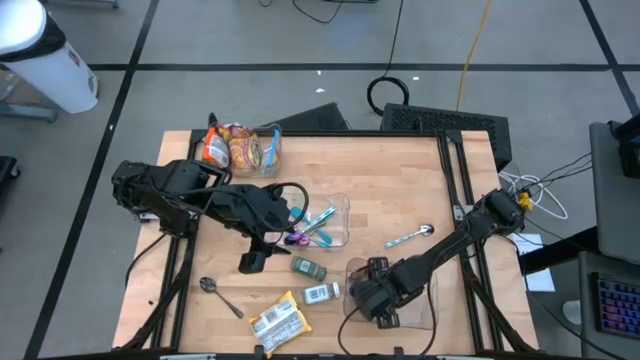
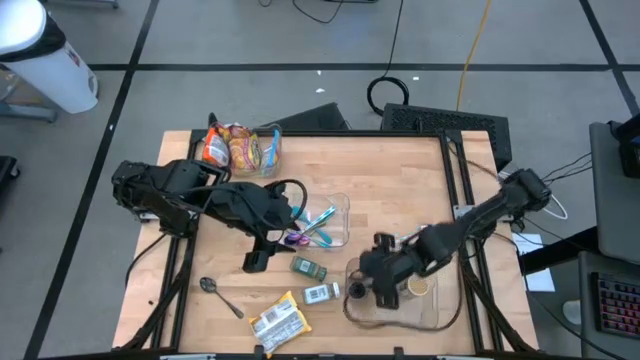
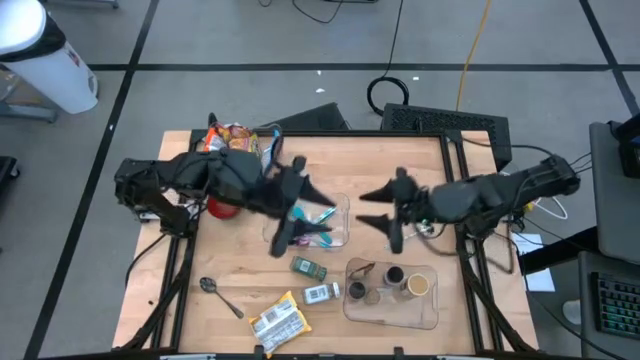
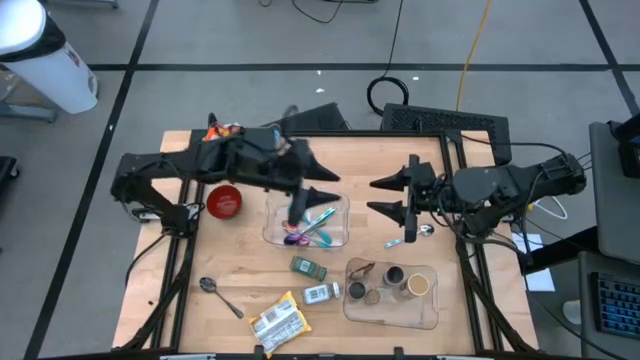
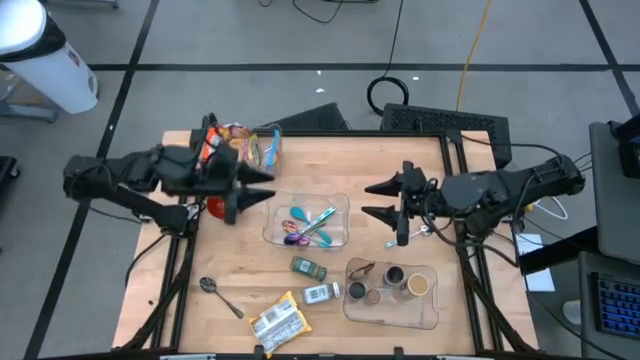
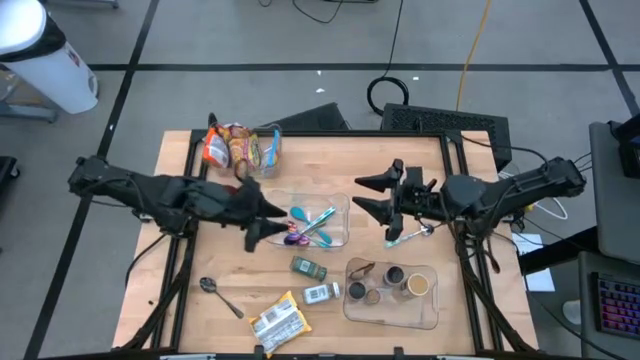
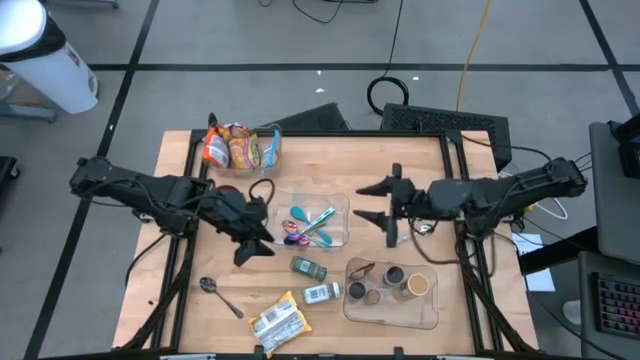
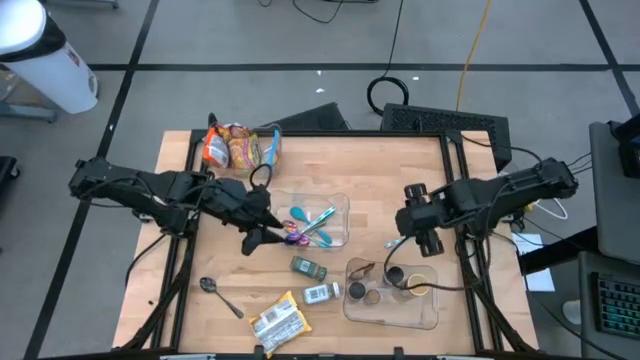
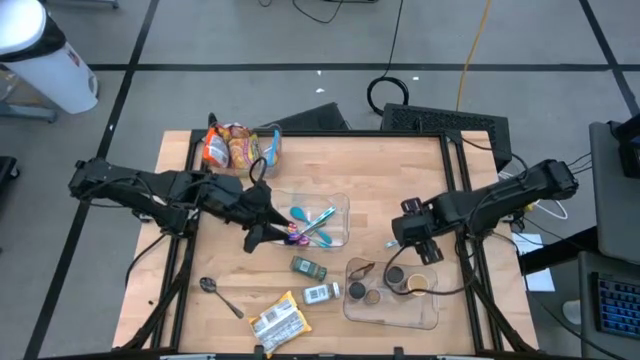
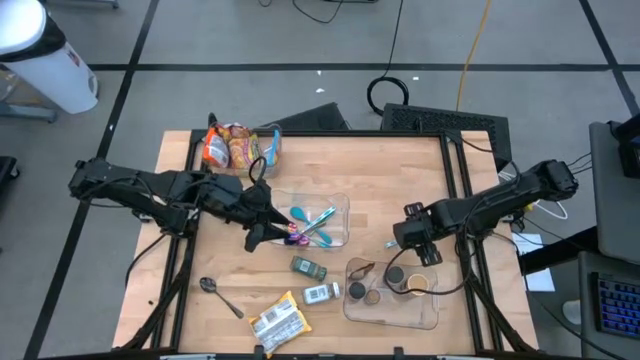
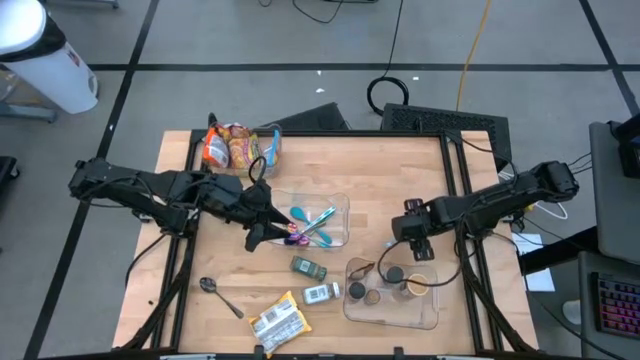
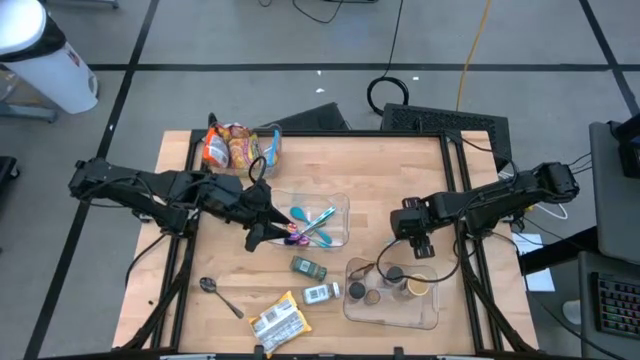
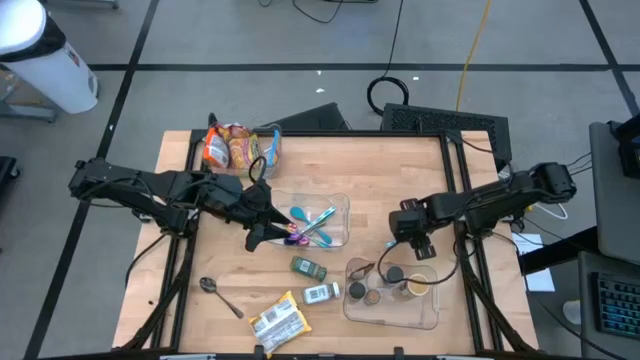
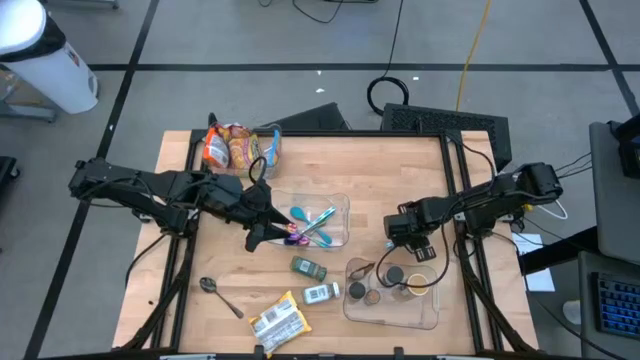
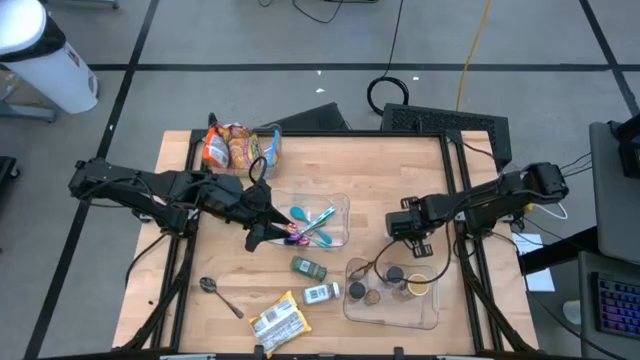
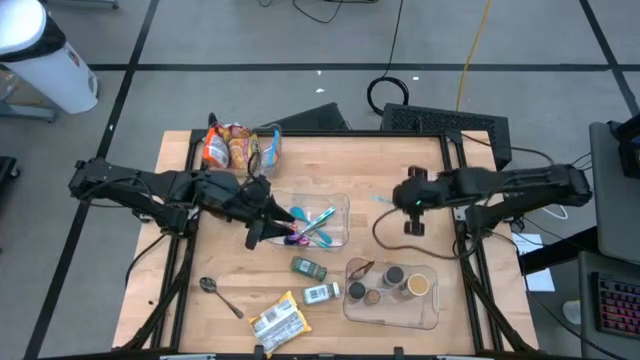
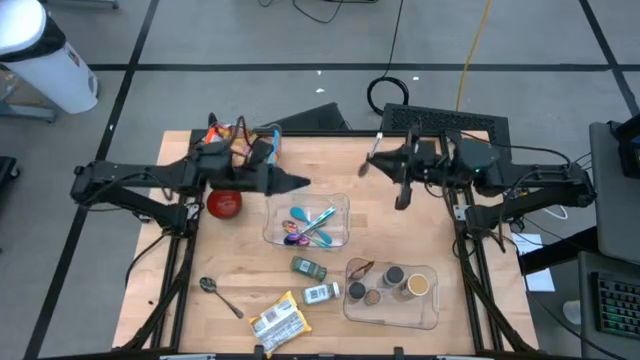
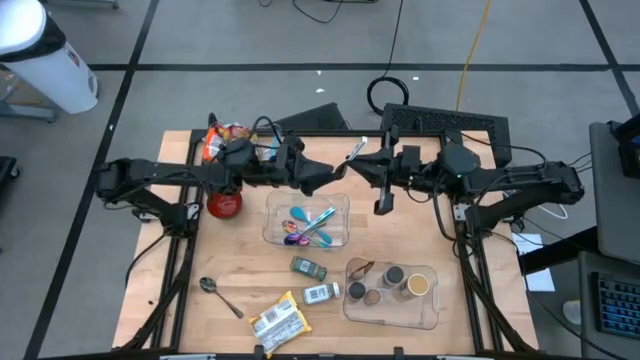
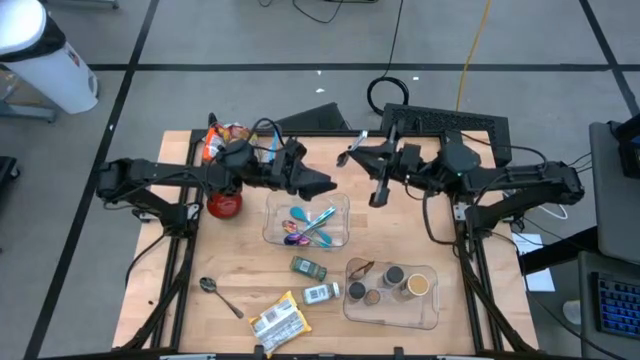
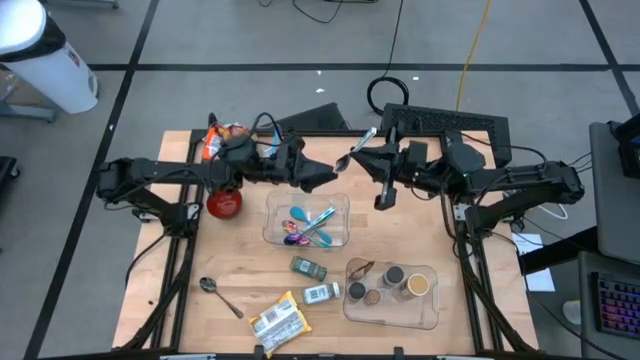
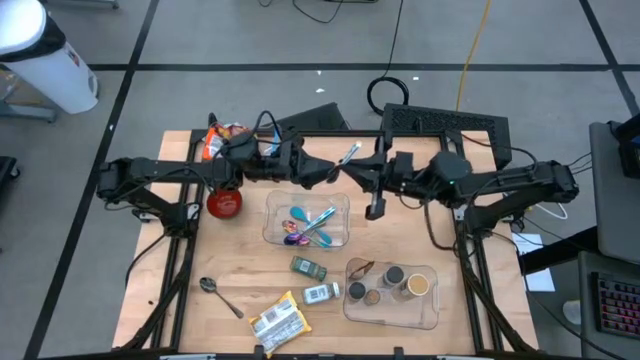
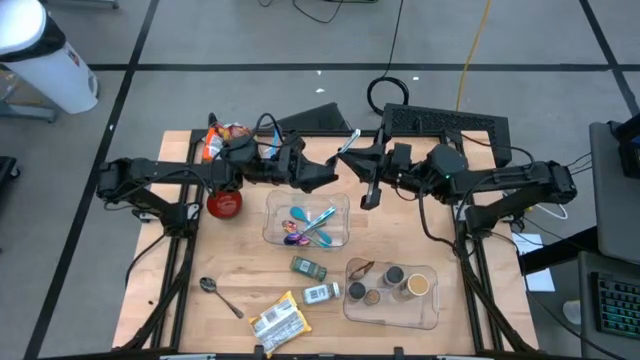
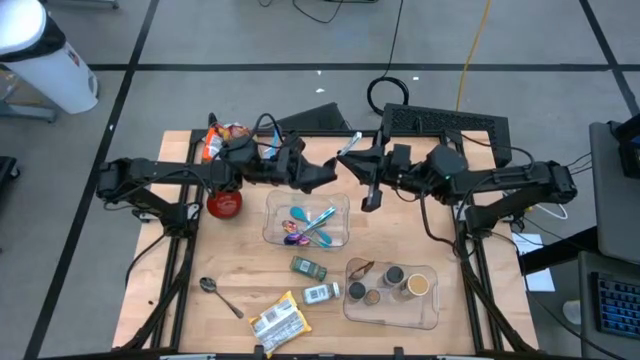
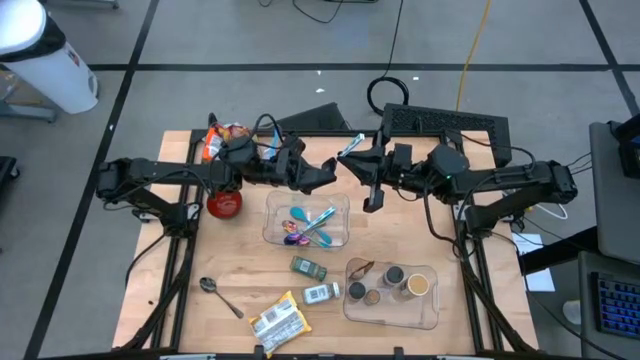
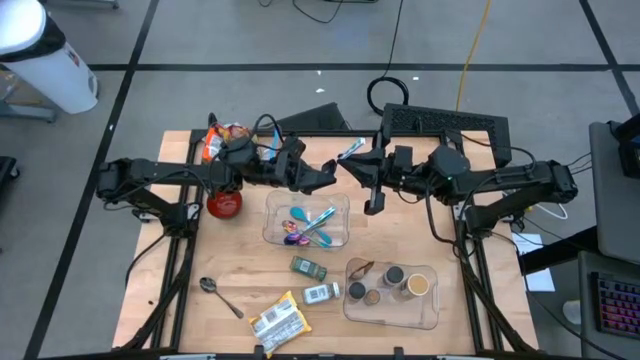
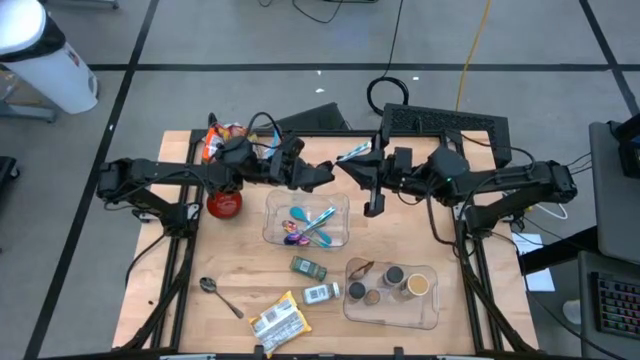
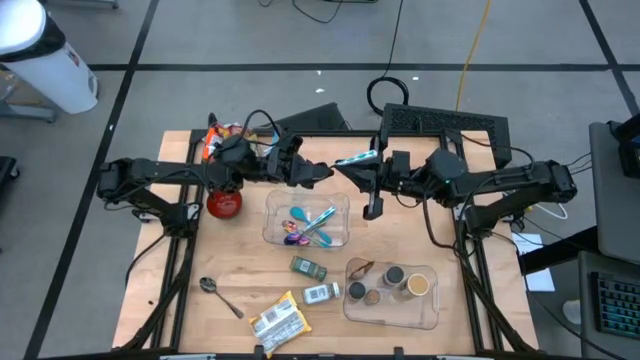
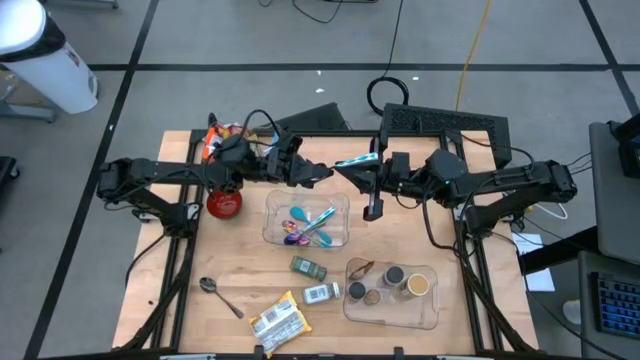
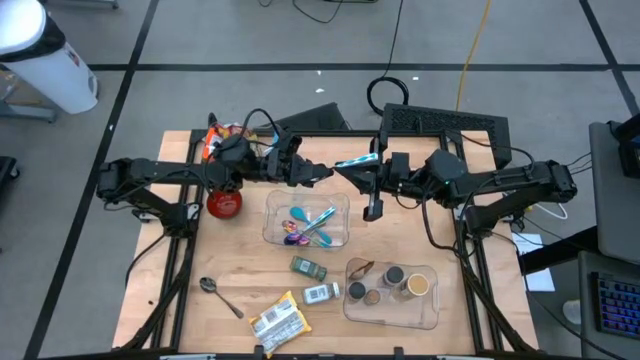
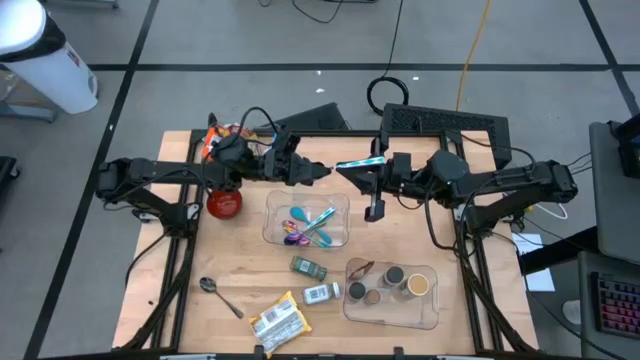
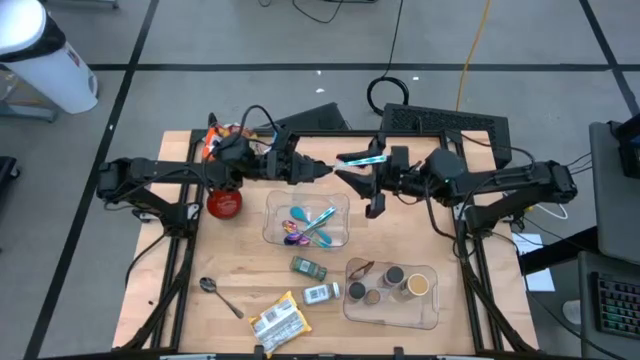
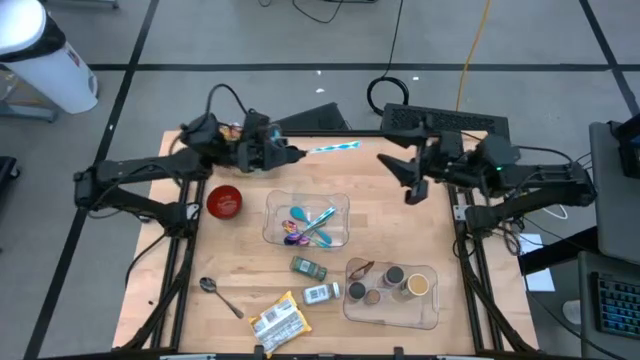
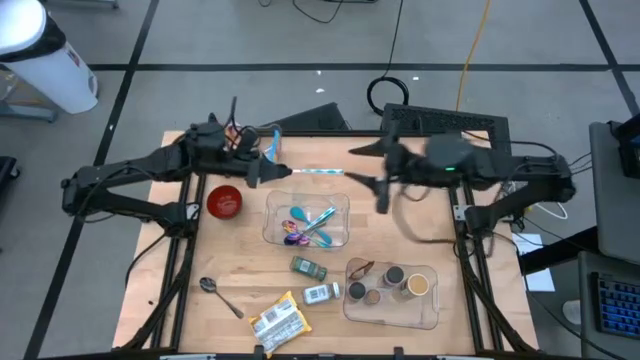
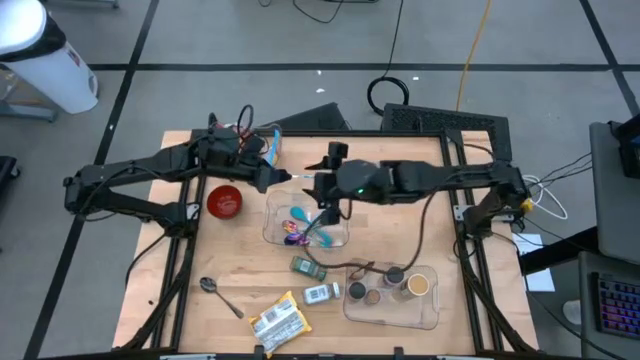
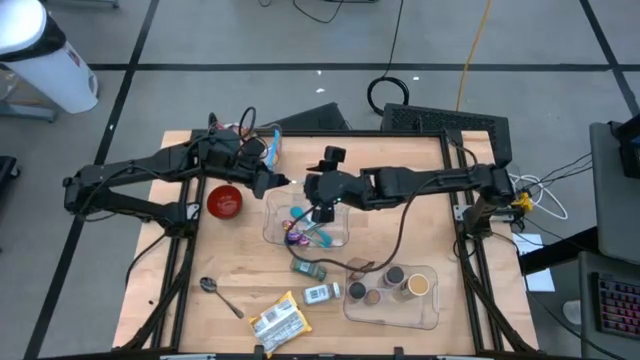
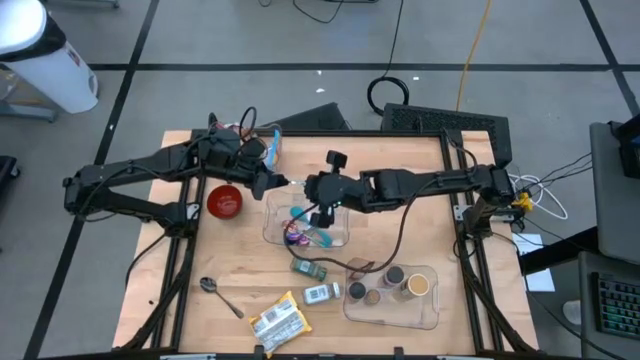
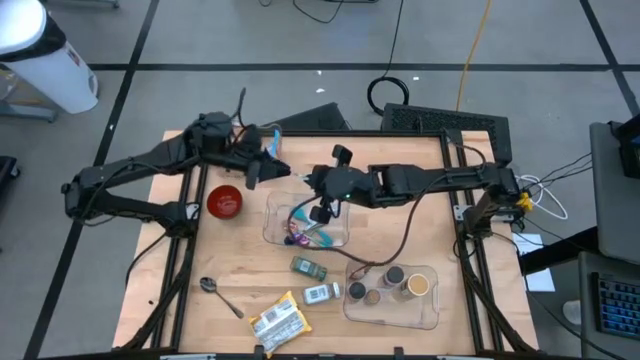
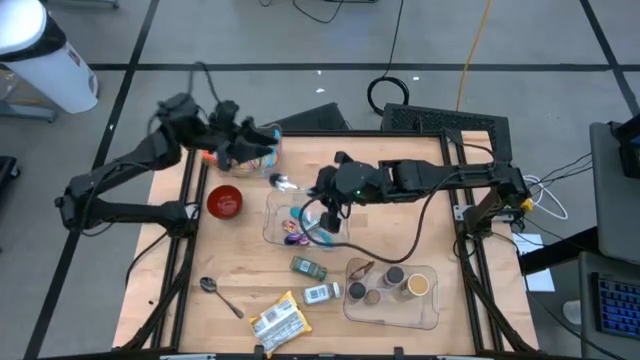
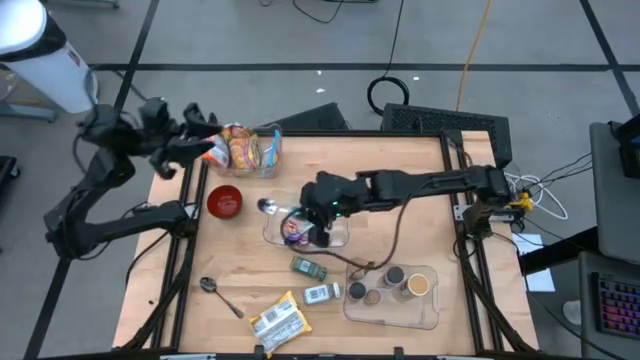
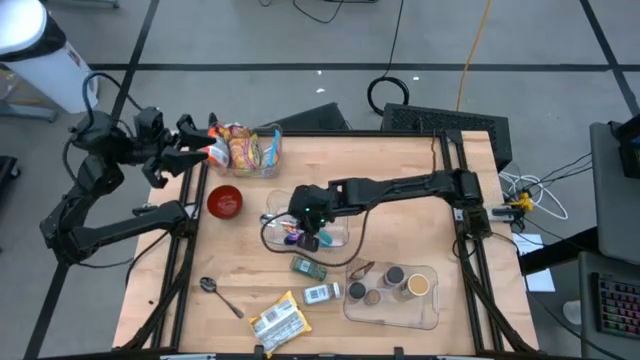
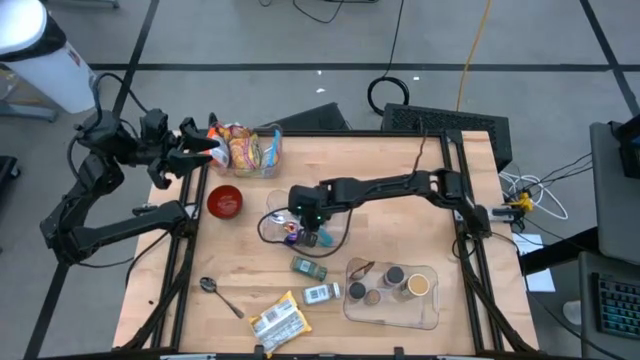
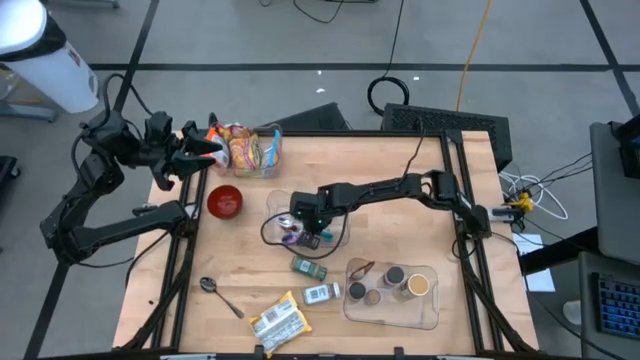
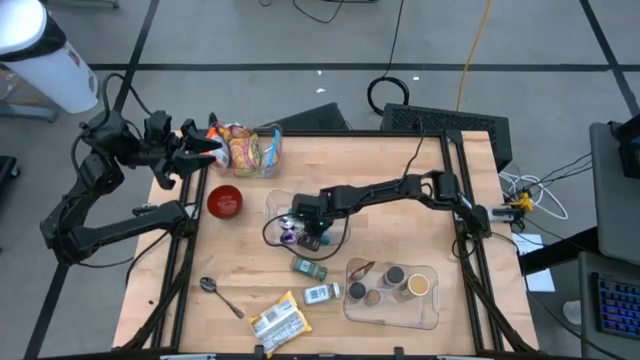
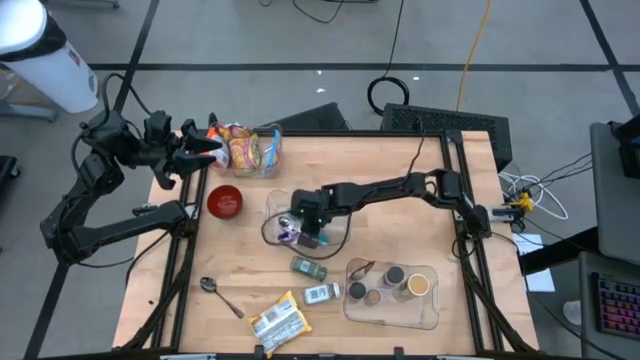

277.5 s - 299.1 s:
Task: Pick & Place Food Item
Put the blue and white patterned spoon into the middle transparent bin
